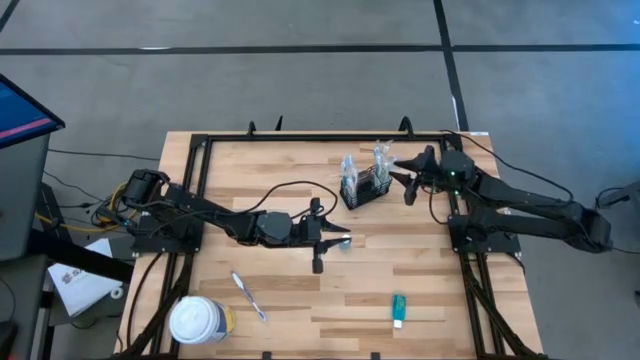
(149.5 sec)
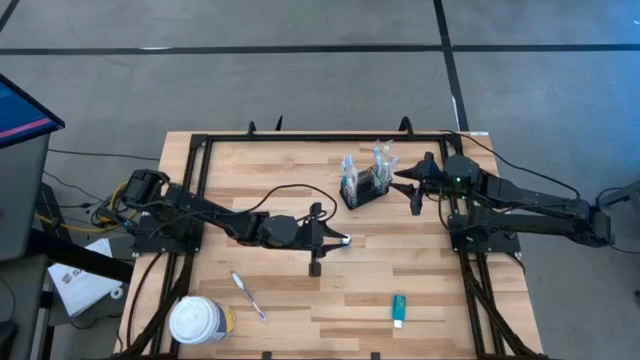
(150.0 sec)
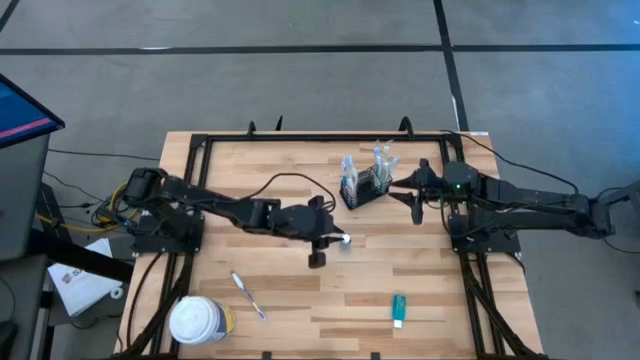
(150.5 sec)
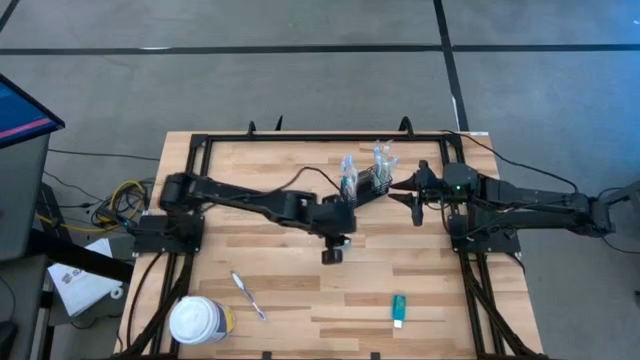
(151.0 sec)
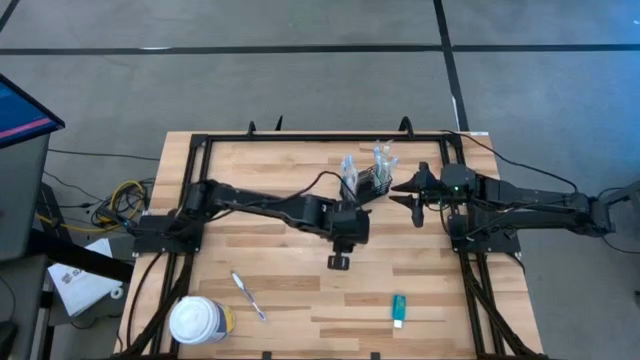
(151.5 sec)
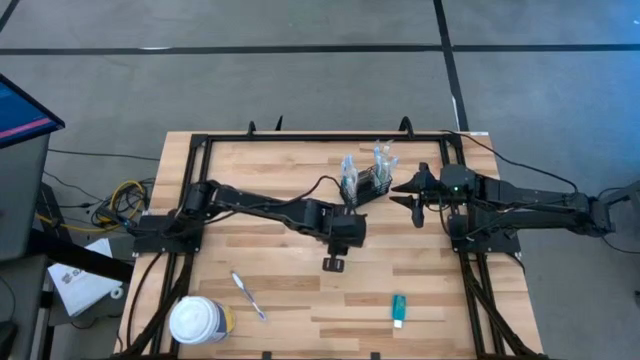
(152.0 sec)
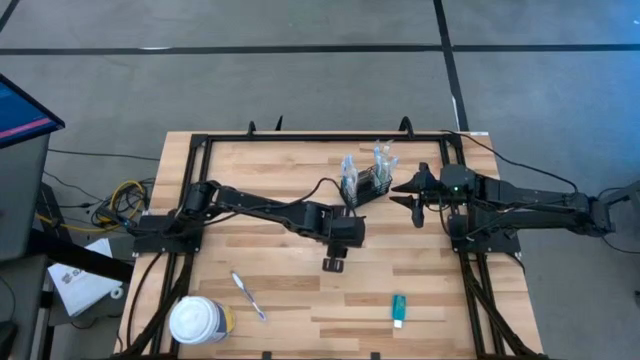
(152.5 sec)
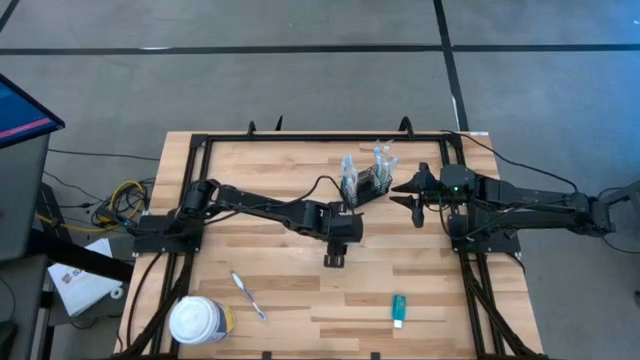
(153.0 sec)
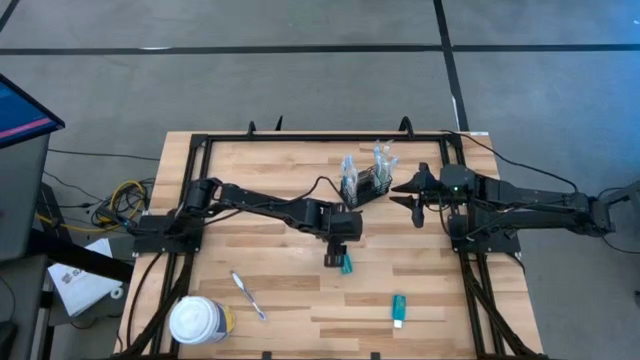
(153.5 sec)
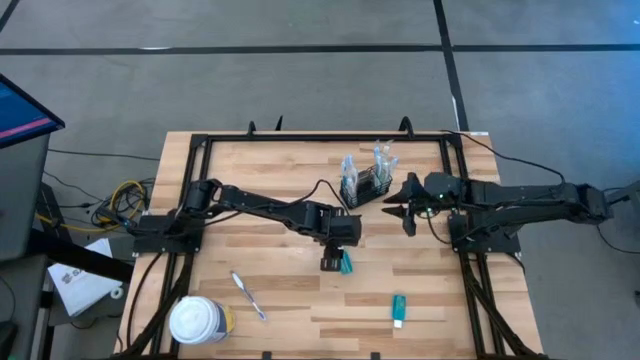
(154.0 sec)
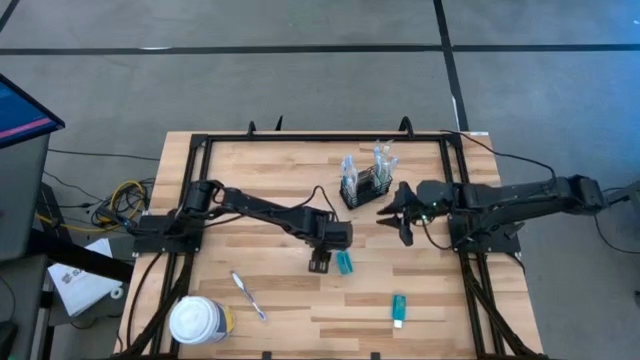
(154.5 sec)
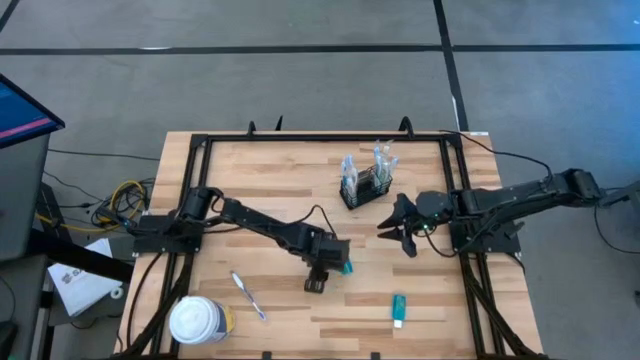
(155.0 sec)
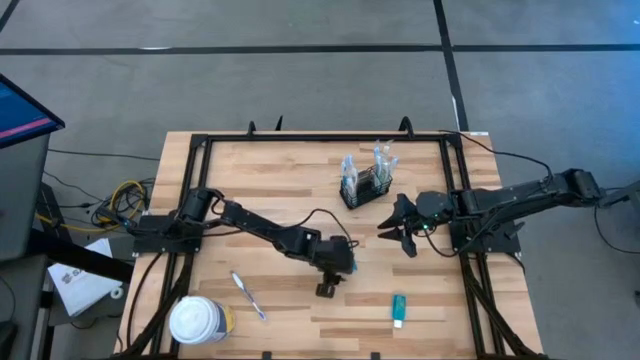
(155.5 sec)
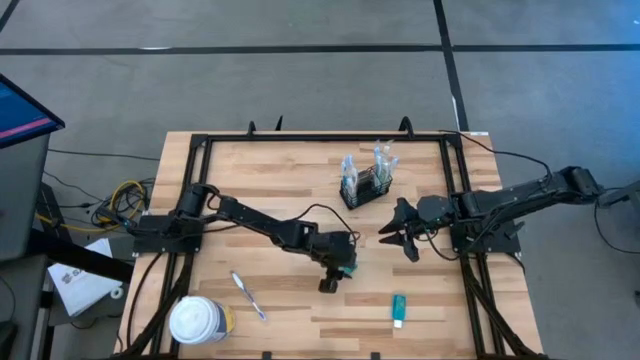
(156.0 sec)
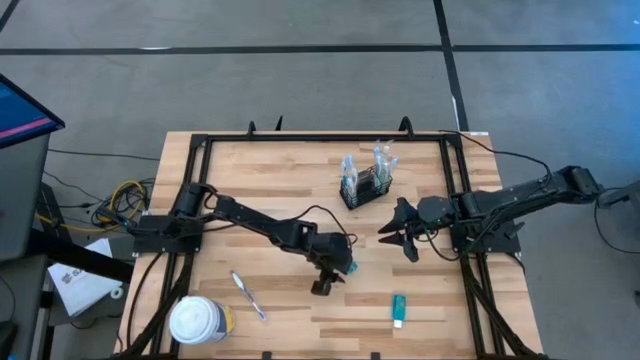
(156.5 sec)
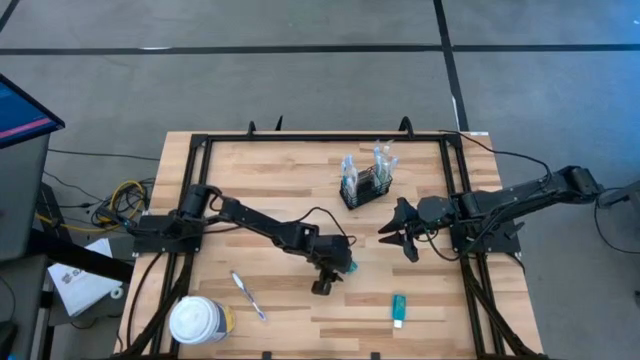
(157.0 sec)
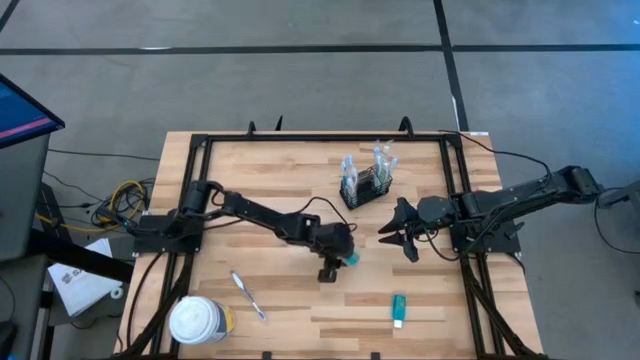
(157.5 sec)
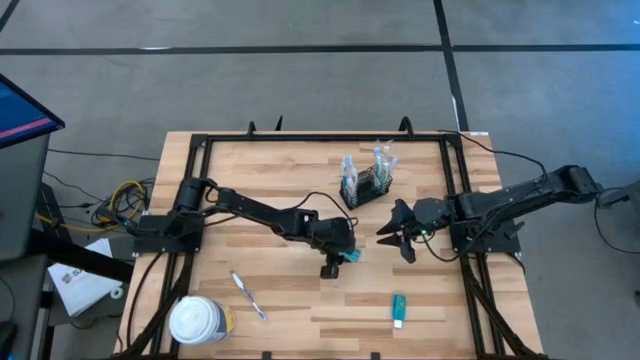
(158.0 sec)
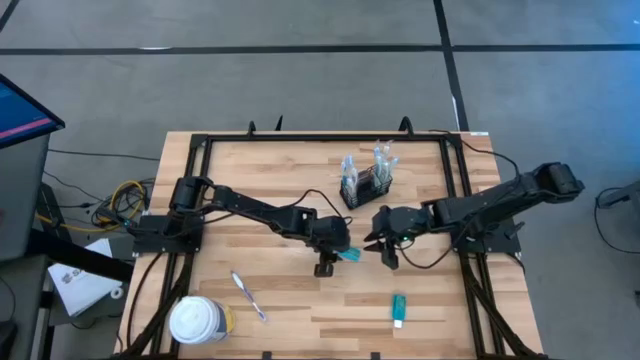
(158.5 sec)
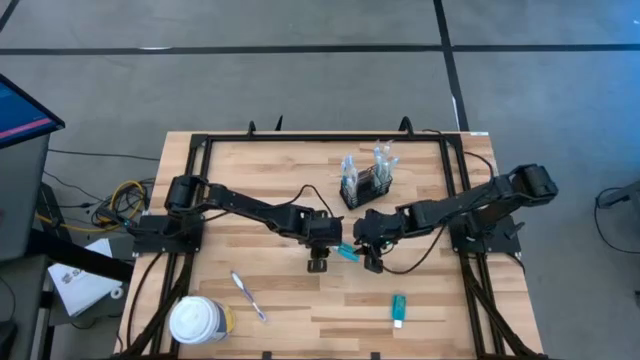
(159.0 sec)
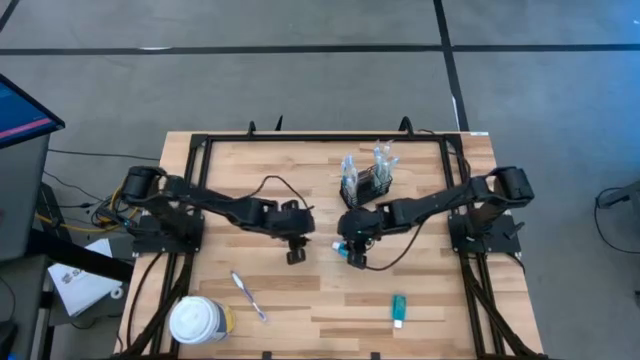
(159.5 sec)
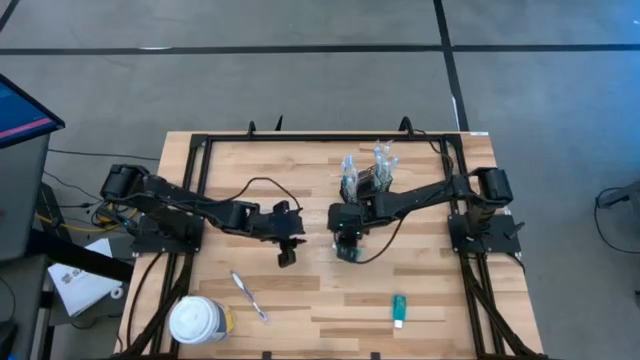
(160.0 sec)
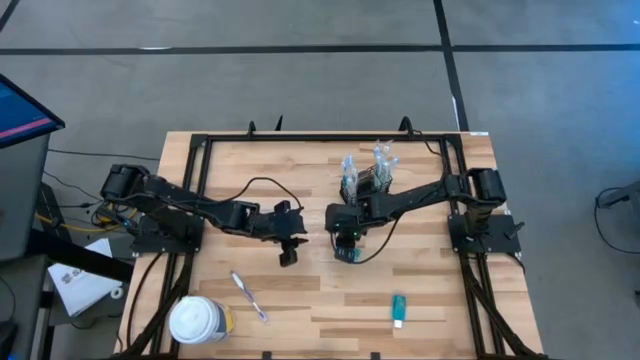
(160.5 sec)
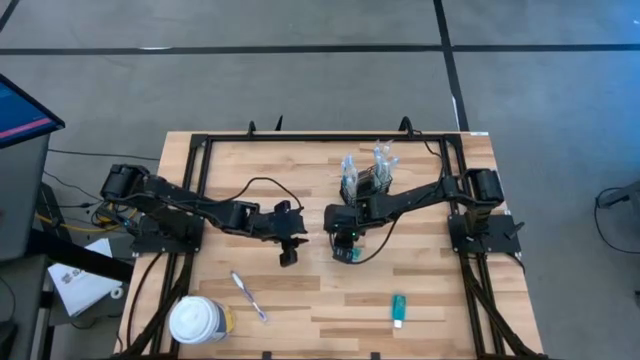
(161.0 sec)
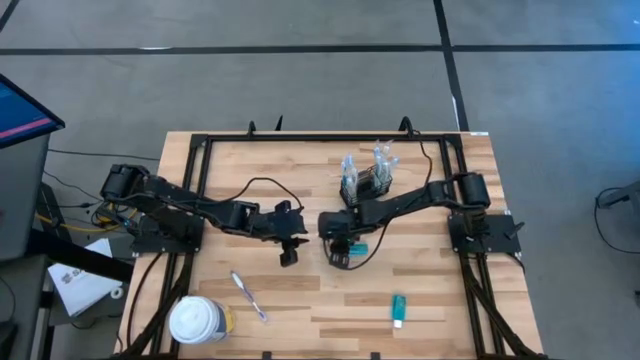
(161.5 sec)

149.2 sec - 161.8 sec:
Task: Pick & Place toothbrushing station
Put the mouthwash bottle into the mesh organizer

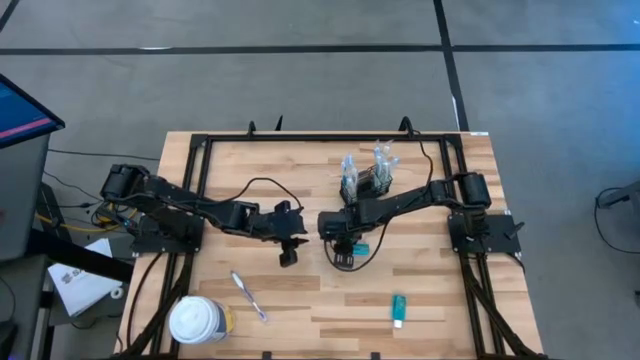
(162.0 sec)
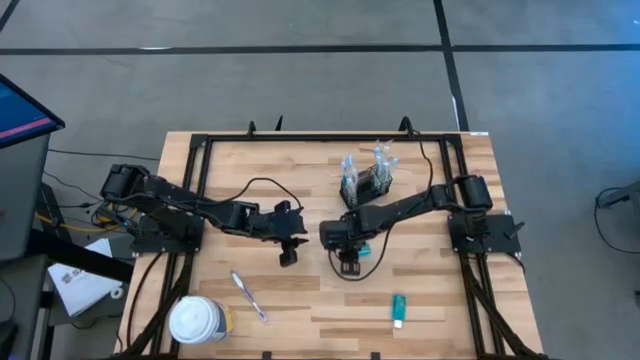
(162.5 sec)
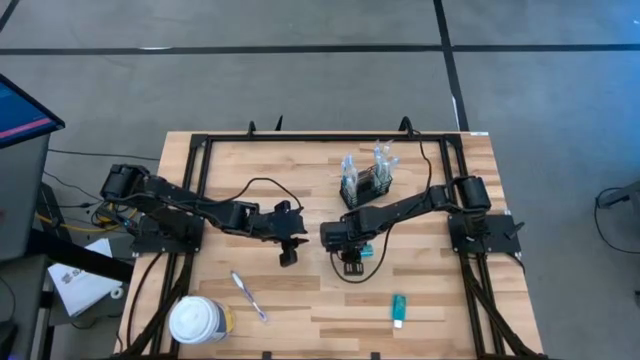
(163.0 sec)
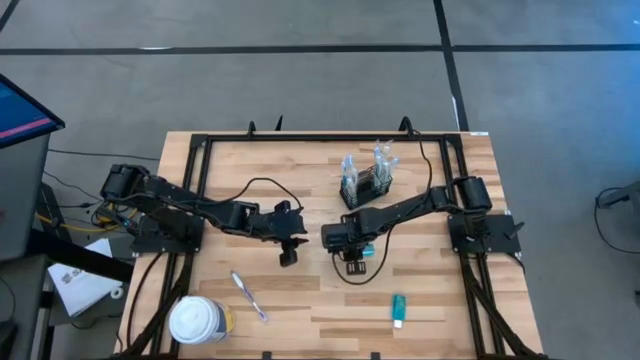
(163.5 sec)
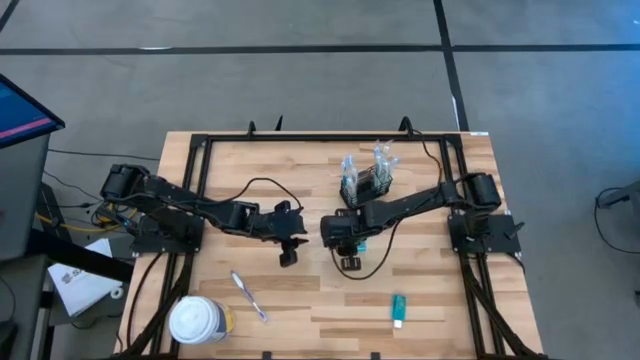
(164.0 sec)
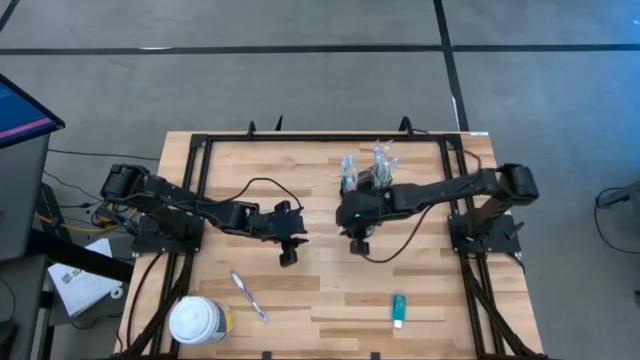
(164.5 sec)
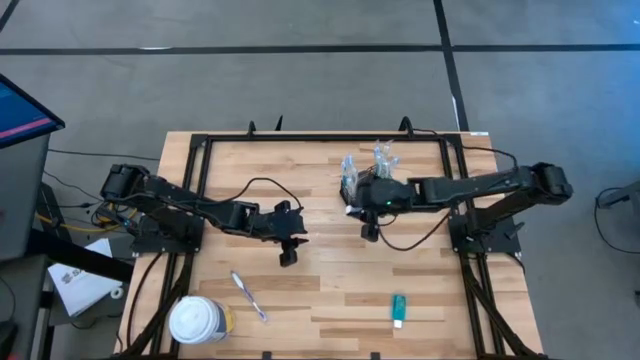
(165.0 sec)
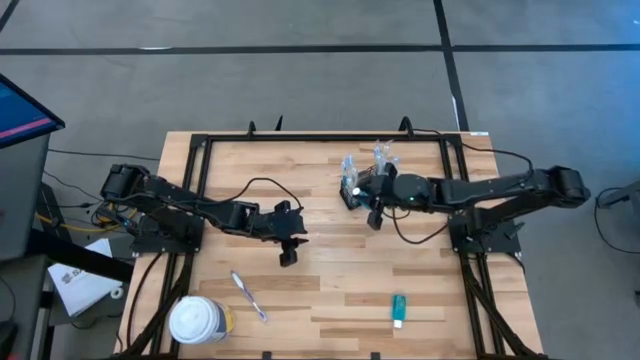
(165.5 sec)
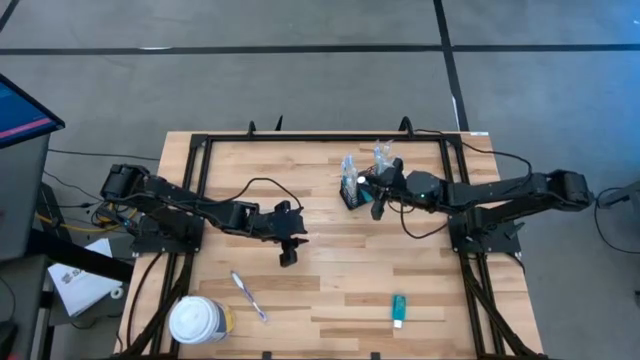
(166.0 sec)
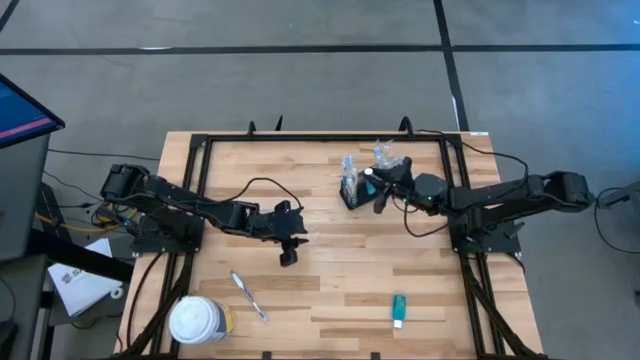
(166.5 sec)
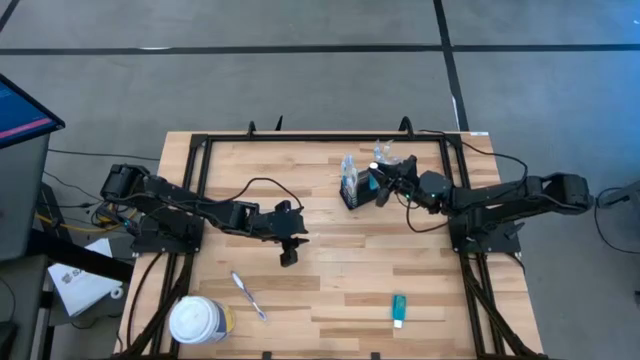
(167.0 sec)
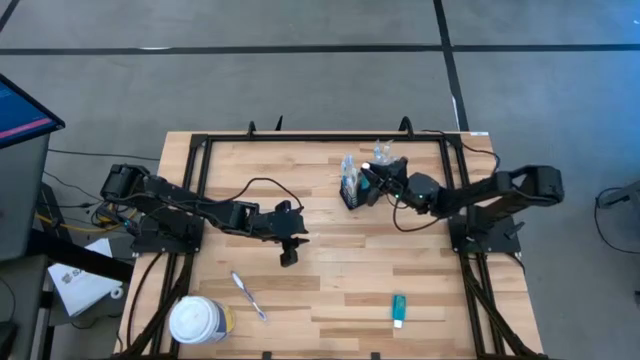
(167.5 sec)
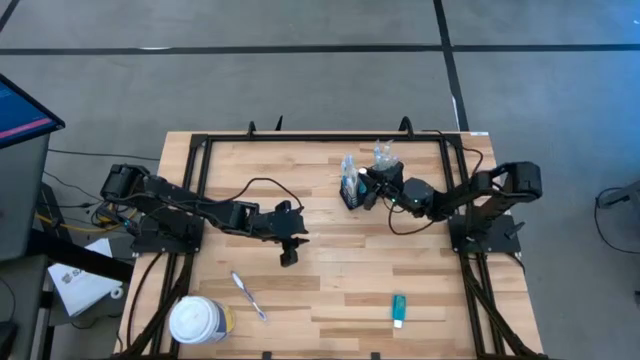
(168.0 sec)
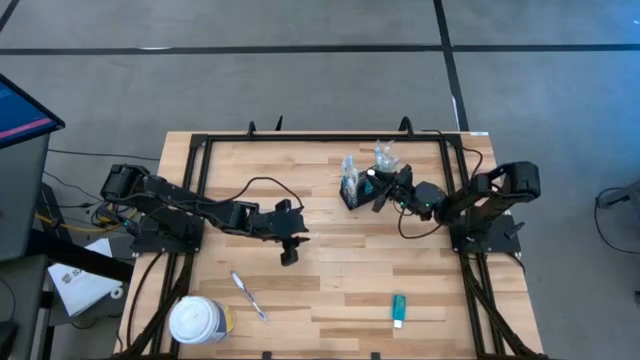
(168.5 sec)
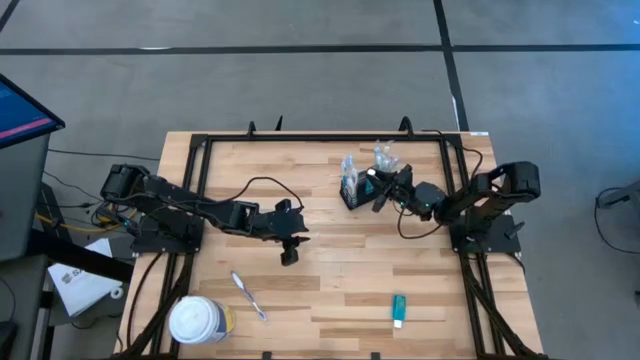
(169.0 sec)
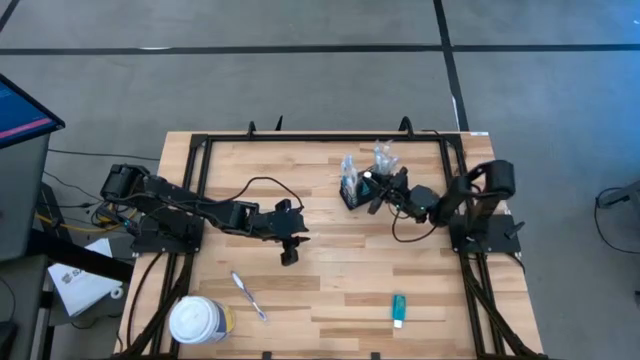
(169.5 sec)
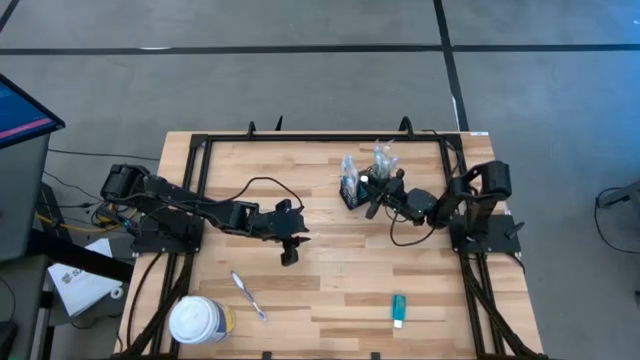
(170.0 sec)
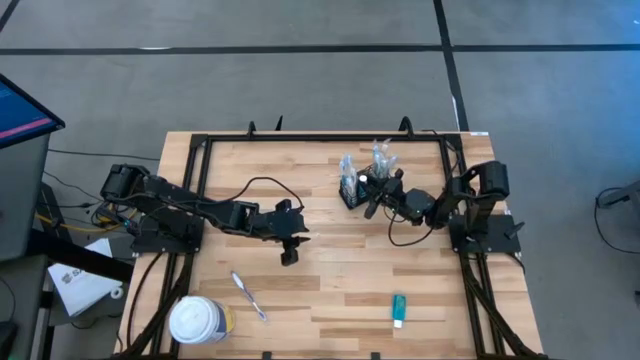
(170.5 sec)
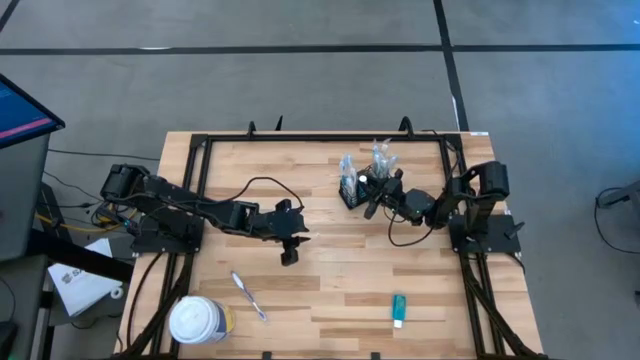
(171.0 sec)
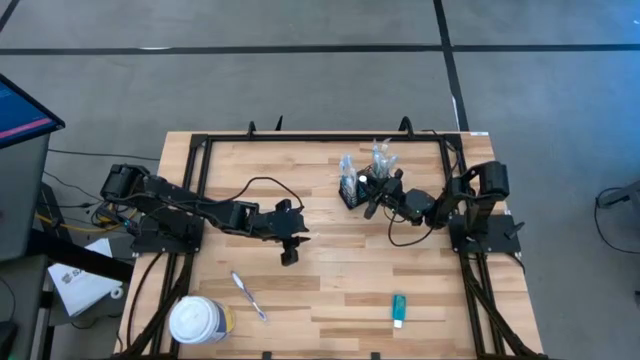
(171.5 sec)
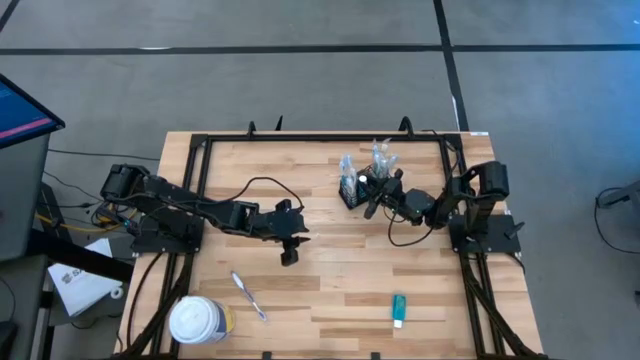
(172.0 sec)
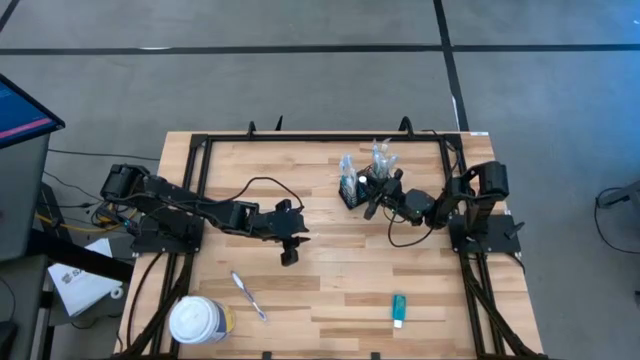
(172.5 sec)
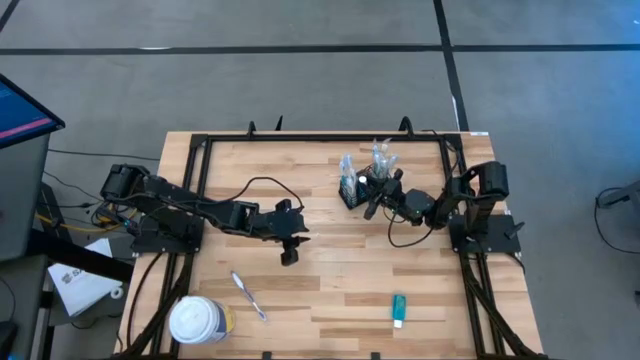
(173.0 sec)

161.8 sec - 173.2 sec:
Put the mouthwash bottle into the mesh organizer
